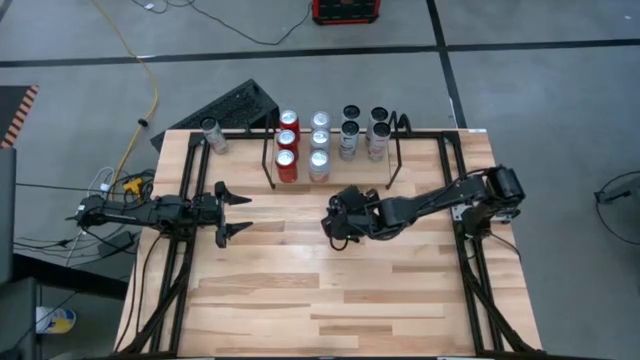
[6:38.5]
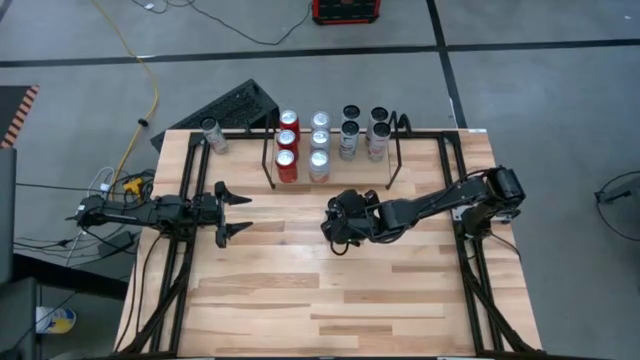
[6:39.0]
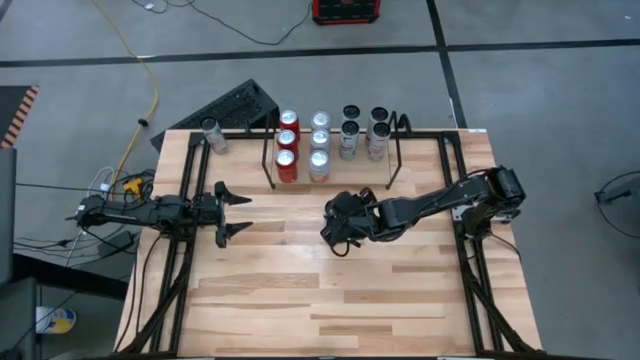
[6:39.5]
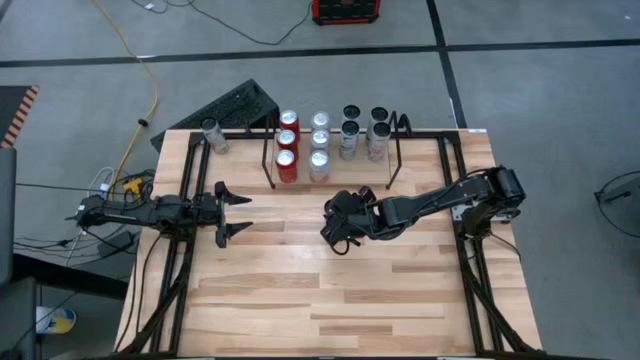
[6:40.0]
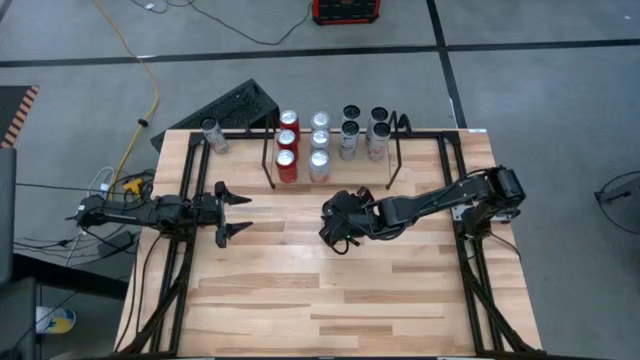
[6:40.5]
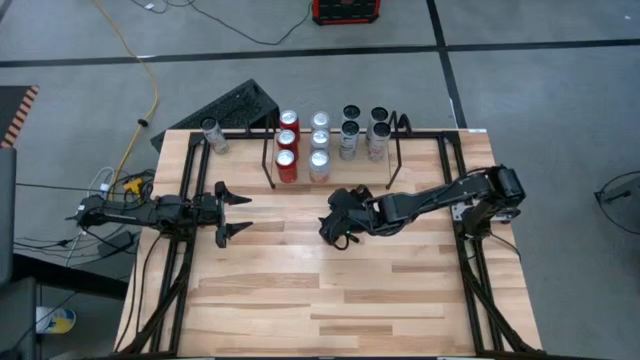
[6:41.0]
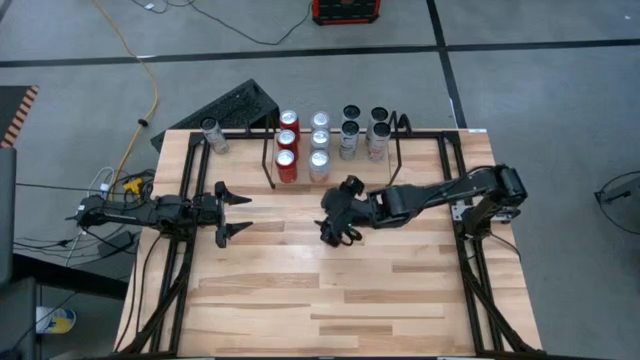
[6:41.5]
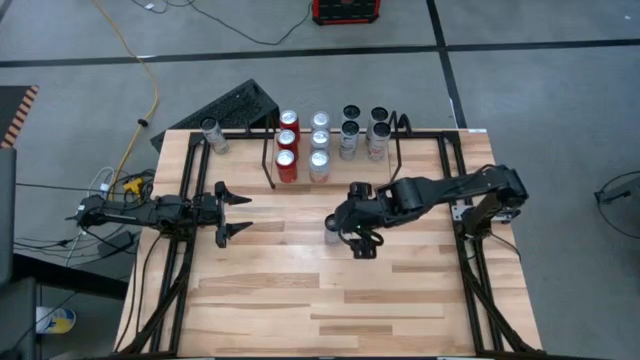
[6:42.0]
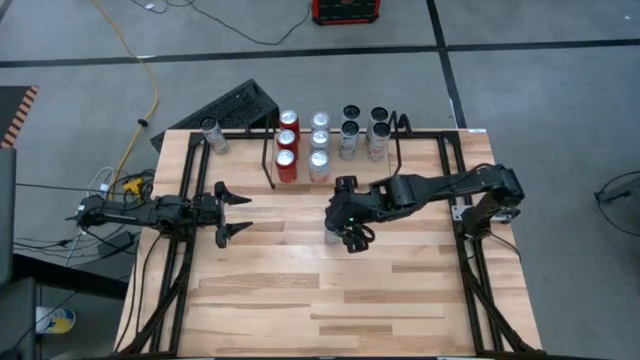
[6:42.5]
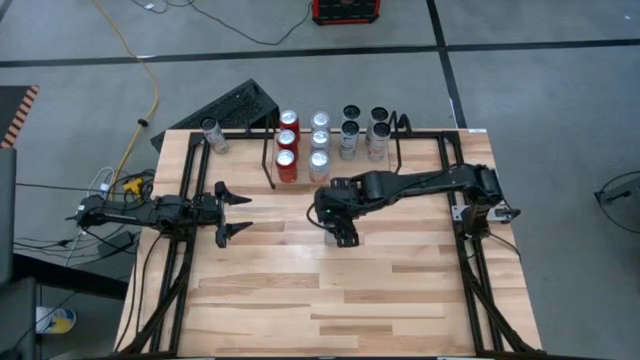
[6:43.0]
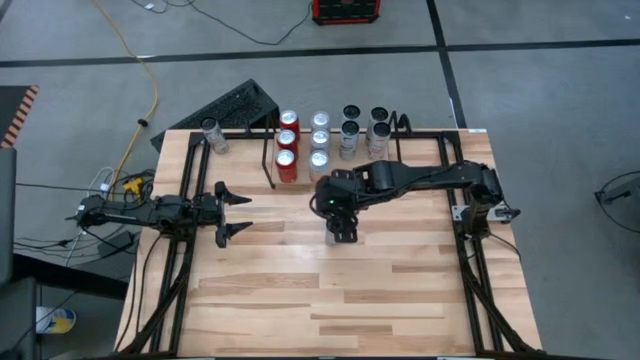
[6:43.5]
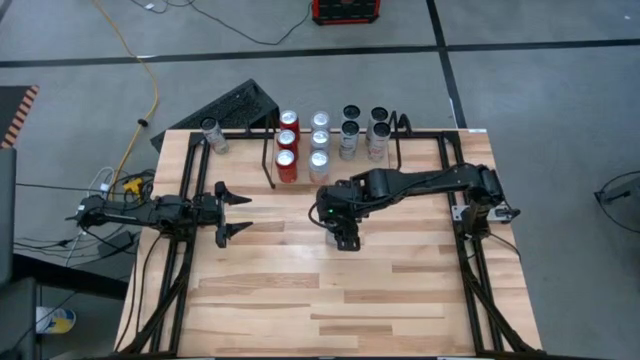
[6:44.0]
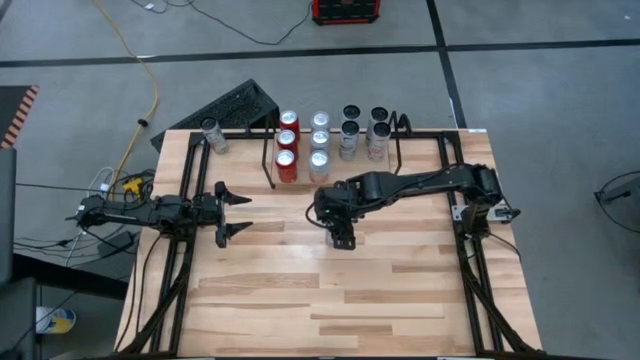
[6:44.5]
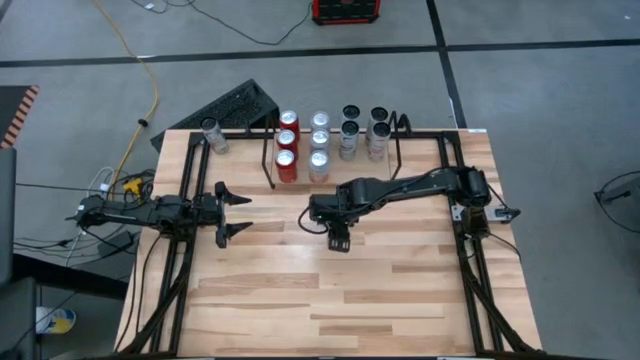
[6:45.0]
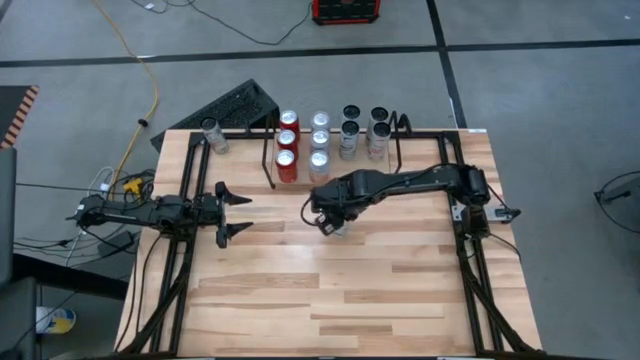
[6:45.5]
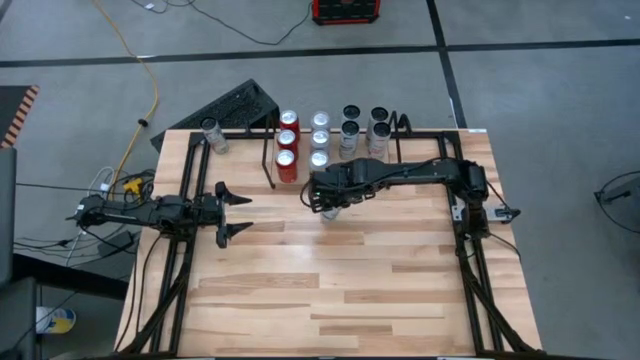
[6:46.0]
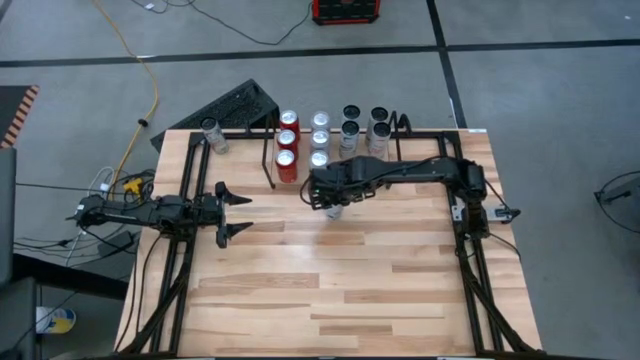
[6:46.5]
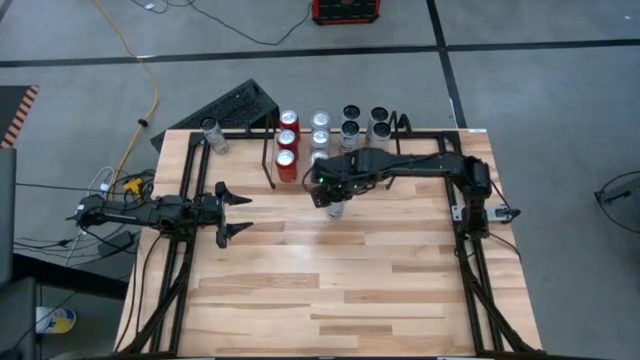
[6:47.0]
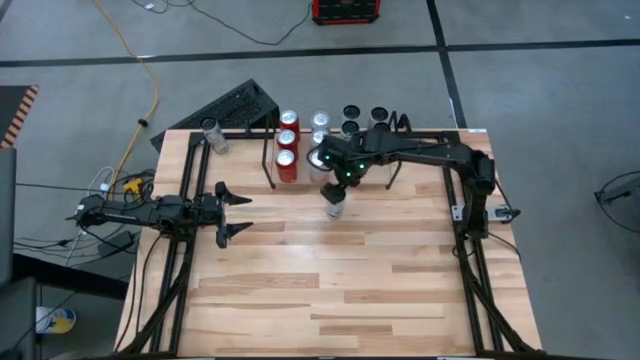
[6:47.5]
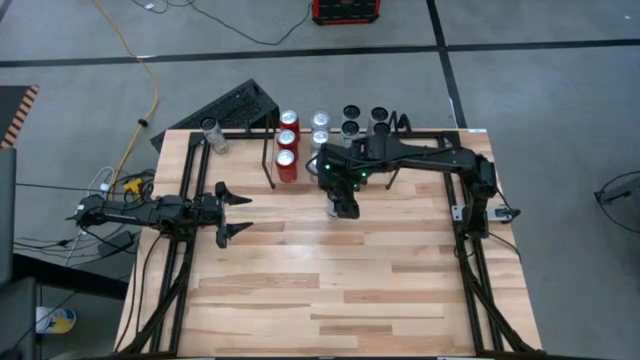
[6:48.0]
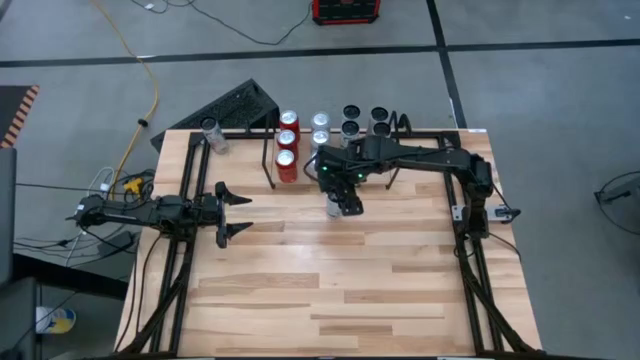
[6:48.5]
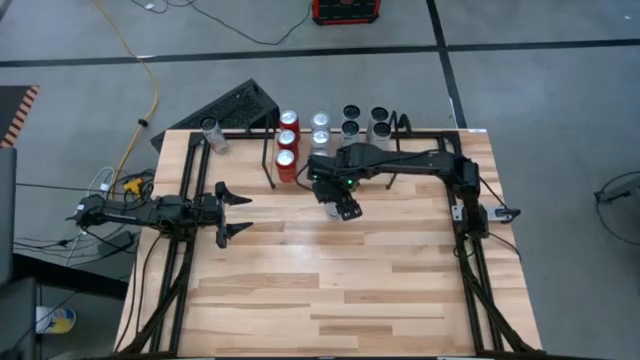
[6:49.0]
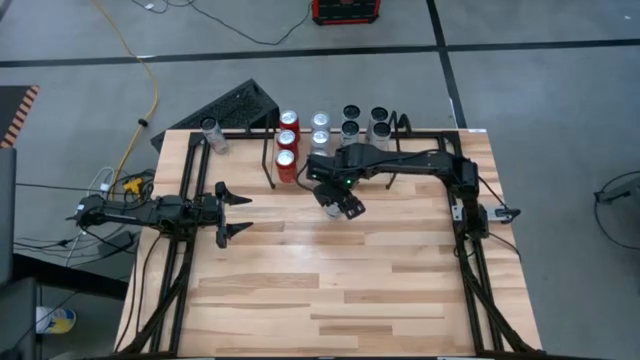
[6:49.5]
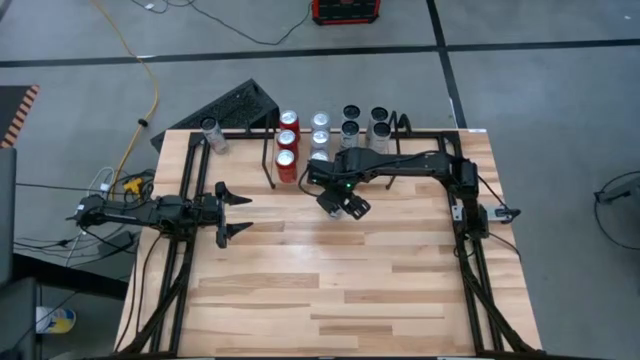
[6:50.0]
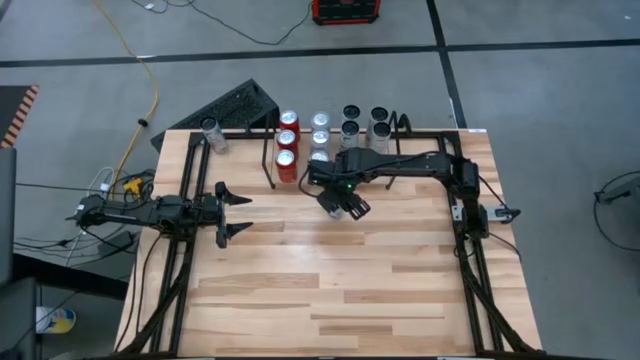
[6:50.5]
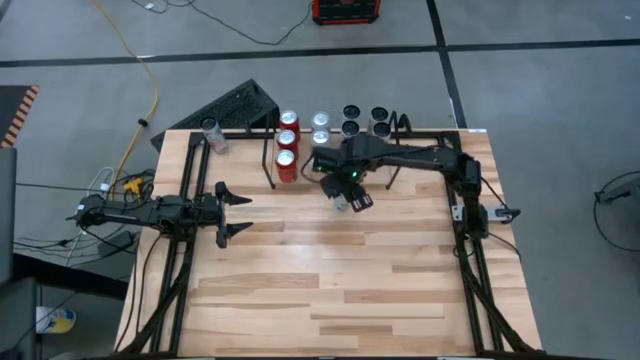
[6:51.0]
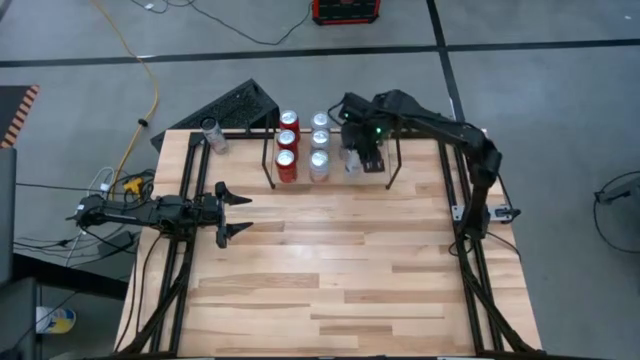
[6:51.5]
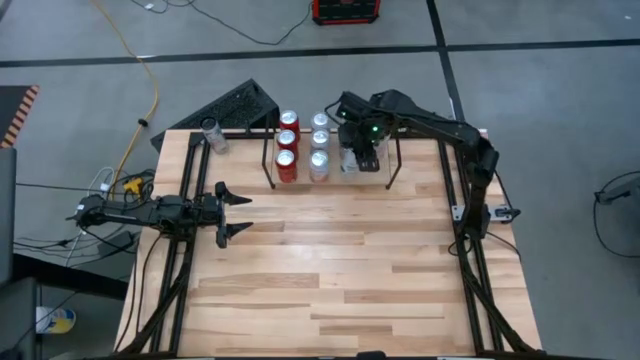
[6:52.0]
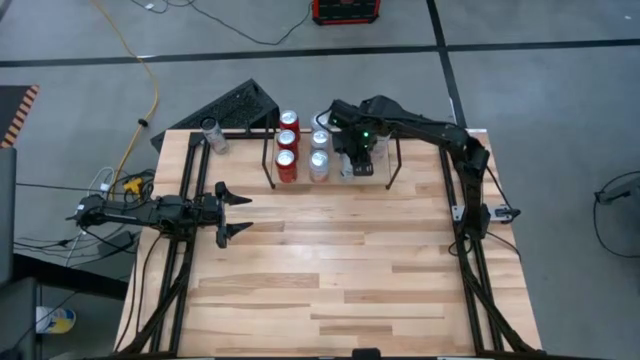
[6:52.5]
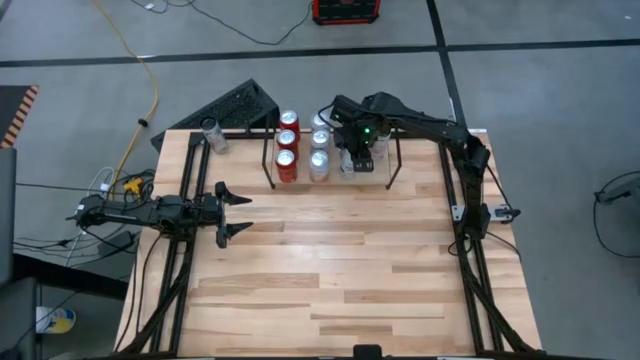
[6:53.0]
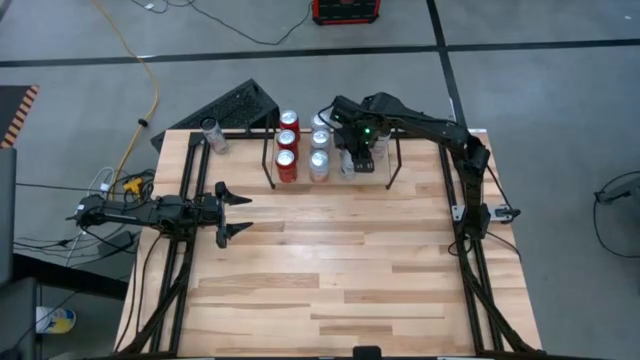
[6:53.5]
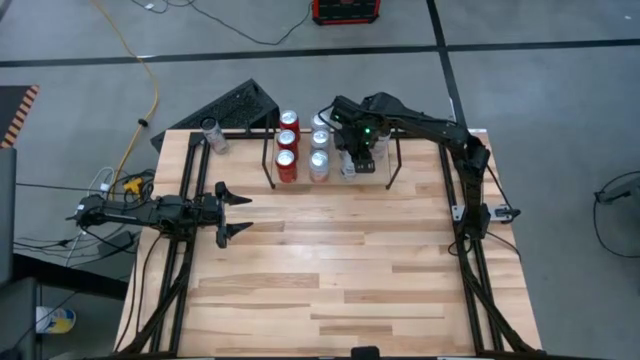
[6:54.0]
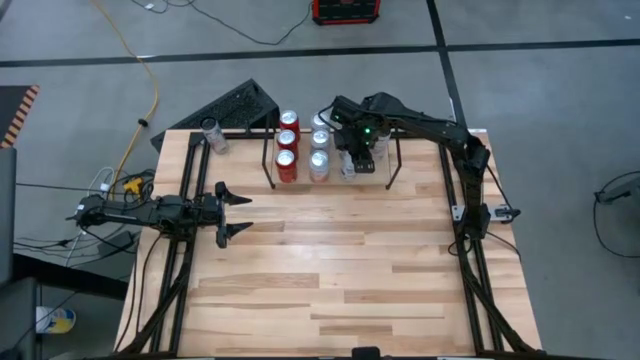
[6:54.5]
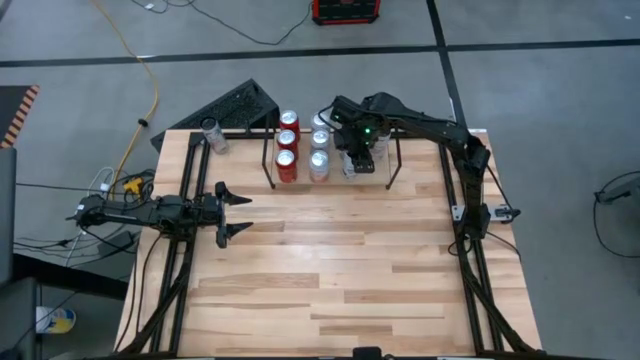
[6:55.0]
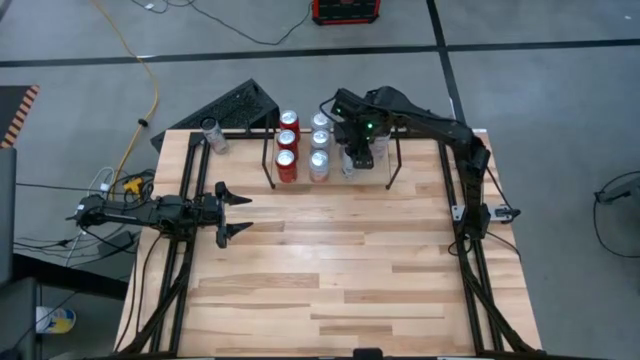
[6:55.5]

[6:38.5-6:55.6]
Task: Place canned beverage on shelf
Put the white blue soda can on the shelf aligned with the other white blue soda cans
